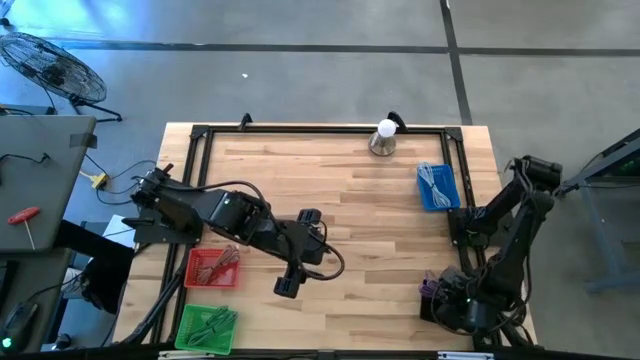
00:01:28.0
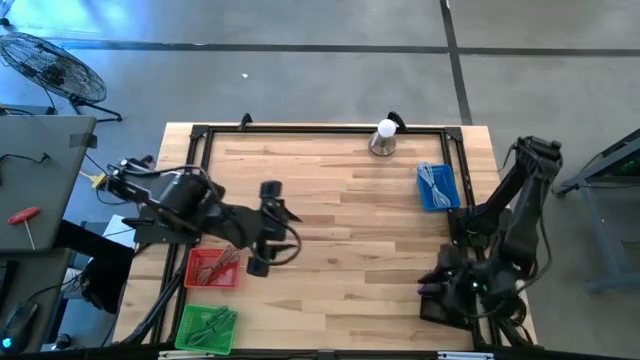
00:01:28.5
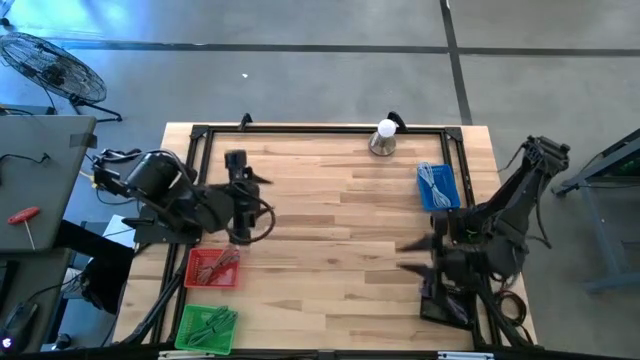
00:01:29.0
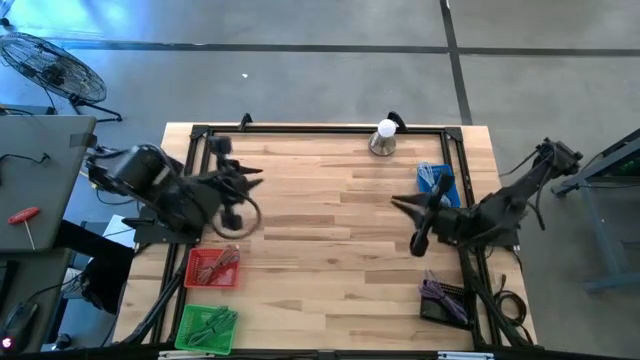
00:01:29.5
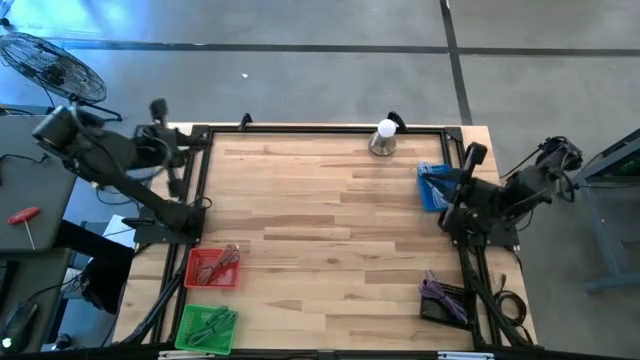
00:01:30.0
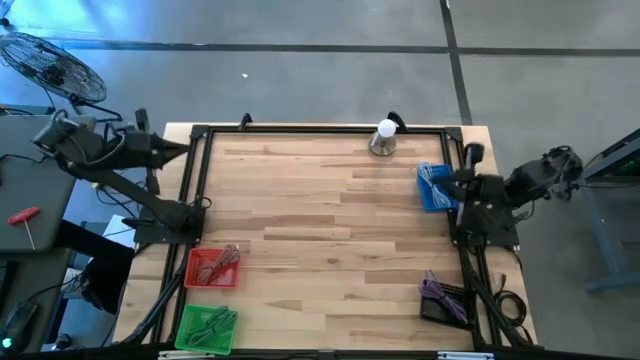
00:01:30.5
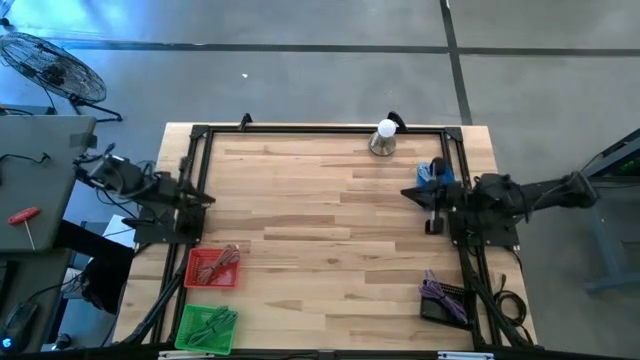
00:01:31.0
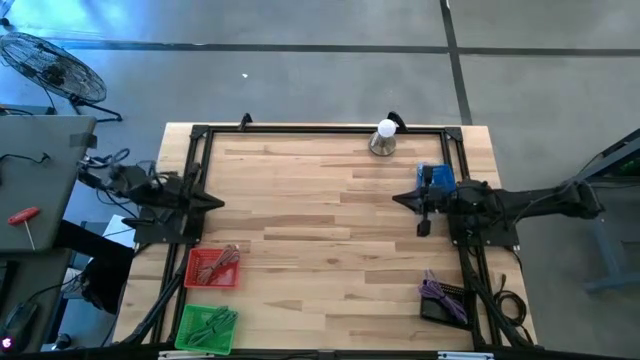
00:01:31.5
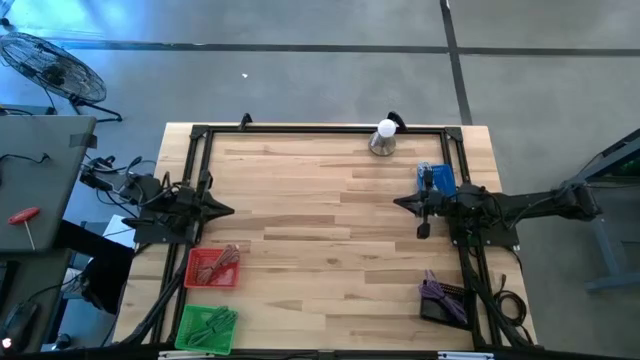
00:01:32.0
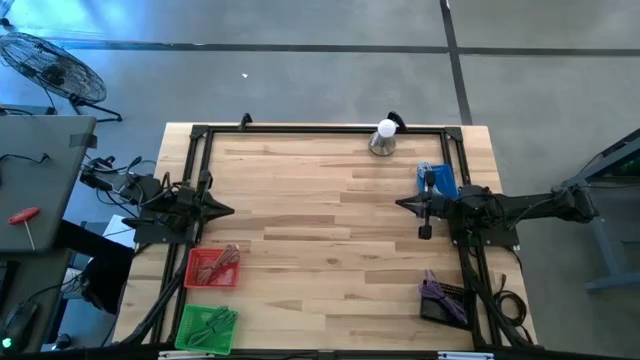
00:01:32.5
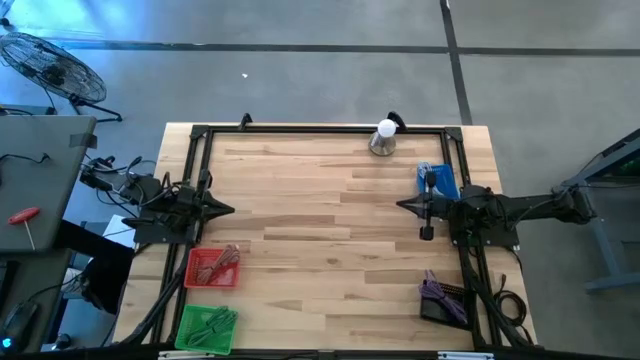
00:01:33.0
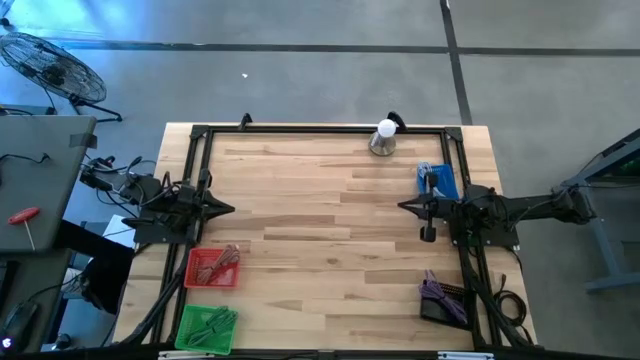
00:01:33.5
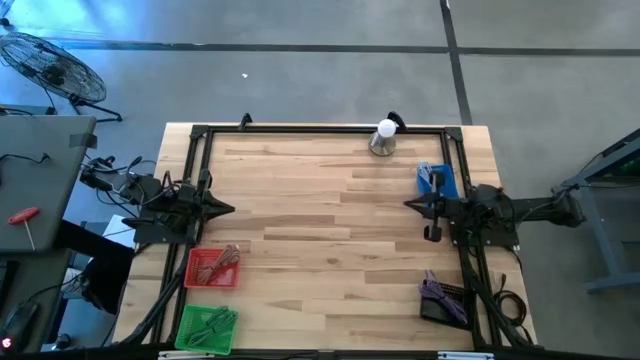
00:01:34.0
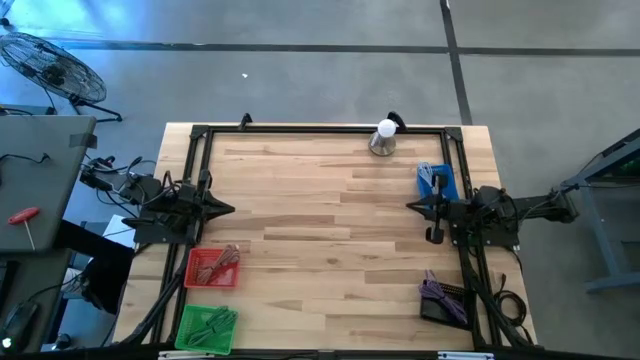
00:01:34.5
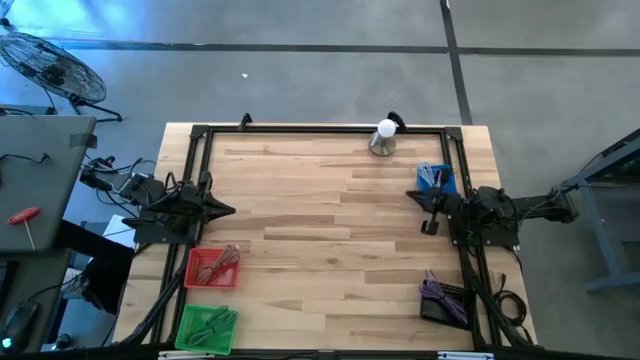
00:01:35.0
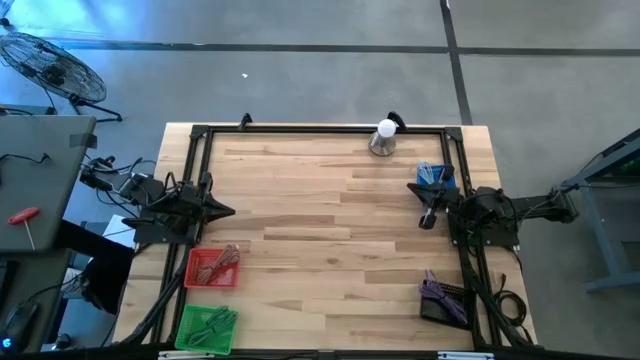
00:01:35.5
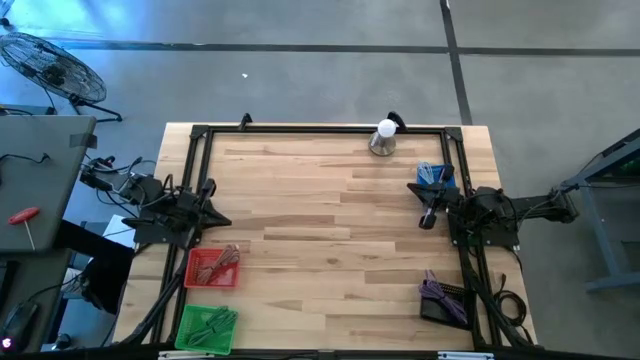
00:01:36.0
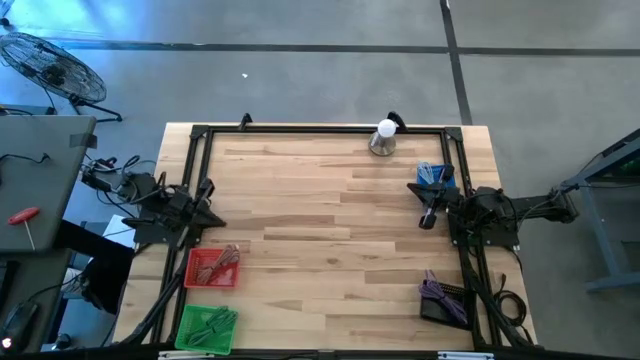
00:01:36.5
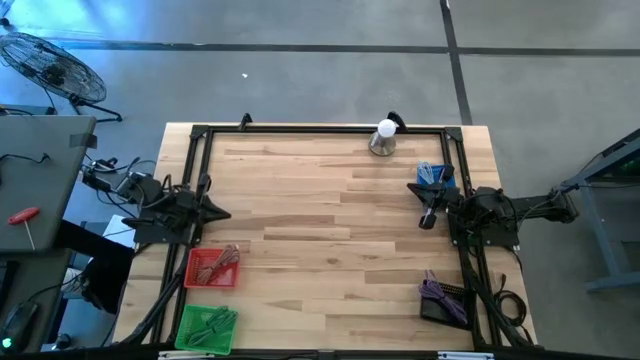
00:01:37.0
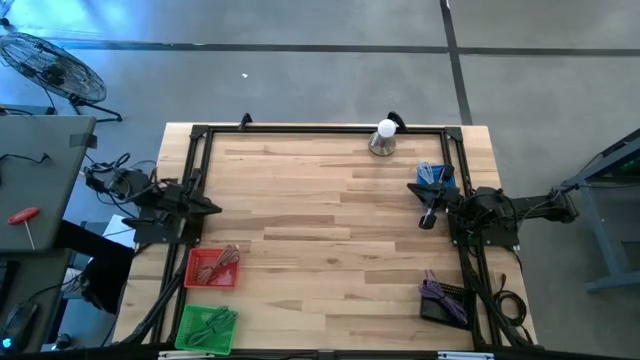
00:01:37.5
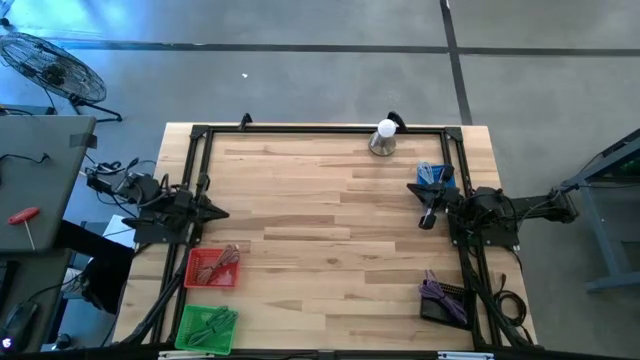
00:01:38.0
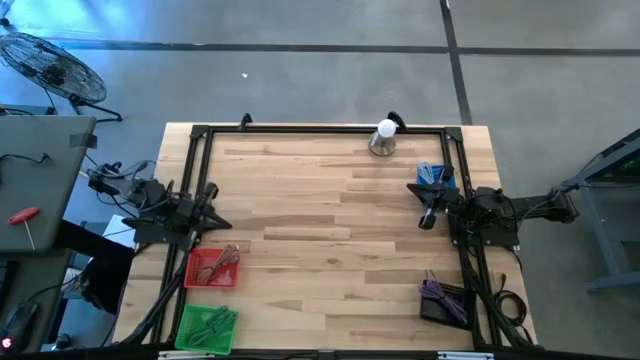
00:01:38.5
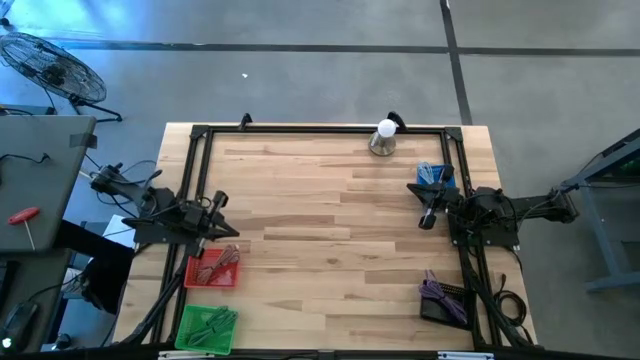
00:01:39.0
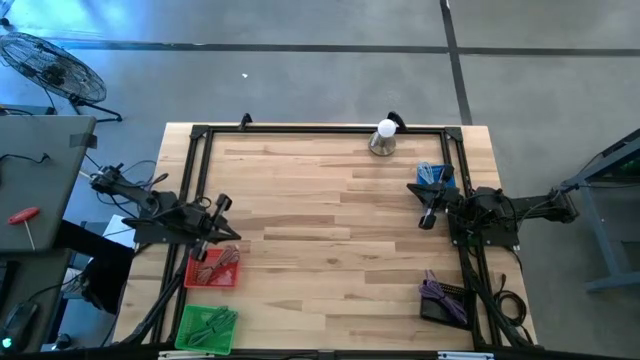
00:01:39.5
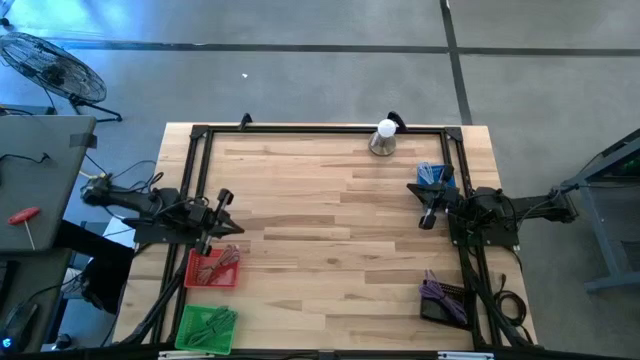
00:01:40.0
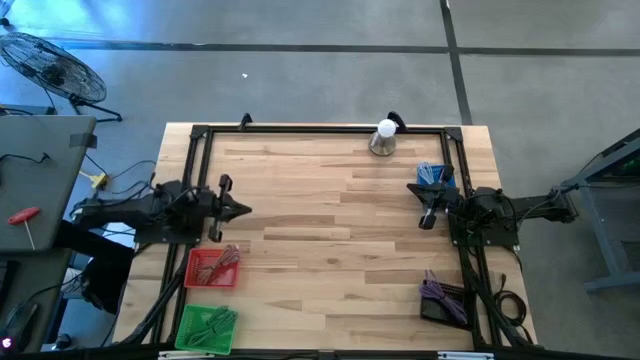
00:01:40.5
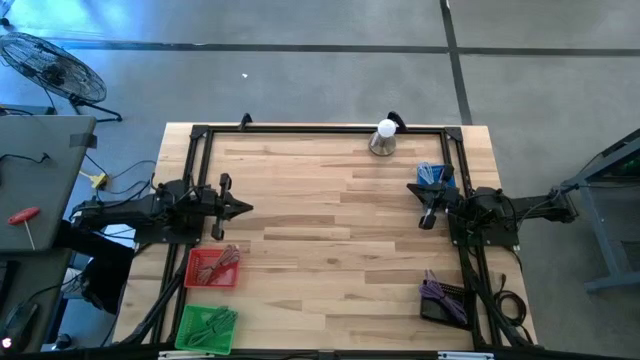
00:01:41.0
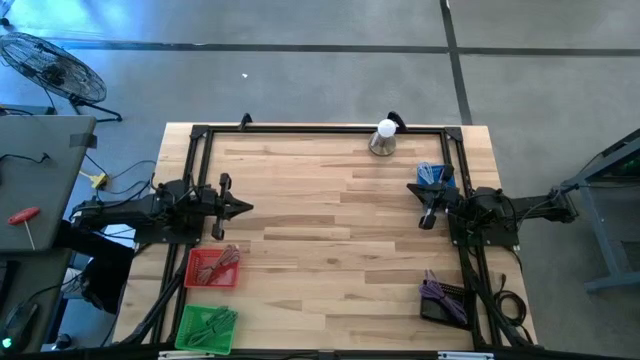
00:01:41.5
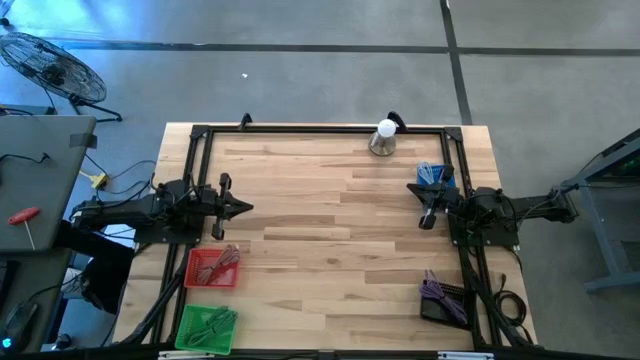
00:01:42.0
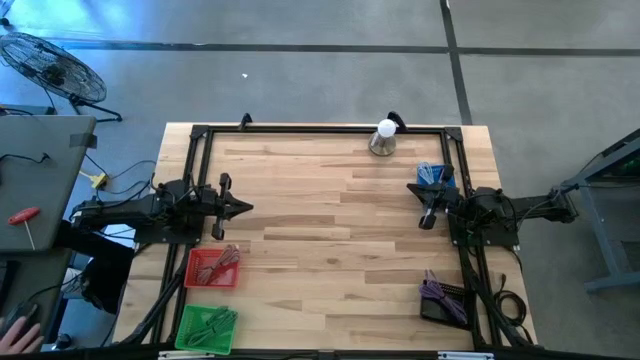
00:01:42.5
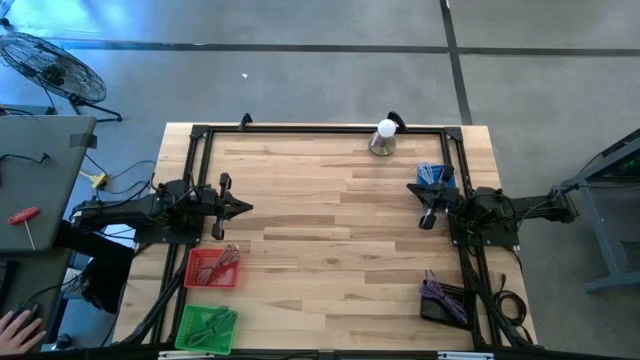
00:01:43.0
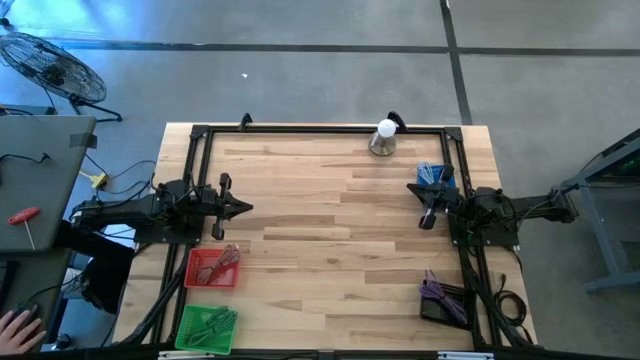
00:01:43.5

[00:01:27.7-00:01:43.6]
Task: Pick & Place USB Port
Return to Home Position

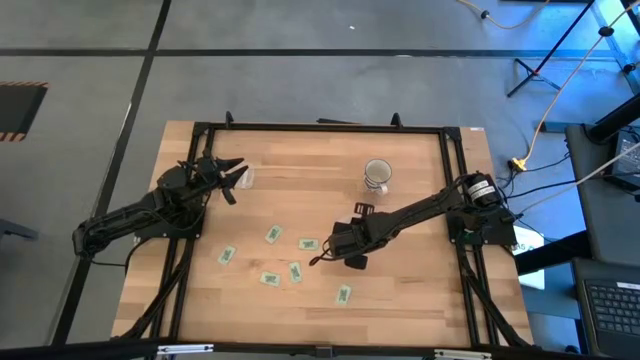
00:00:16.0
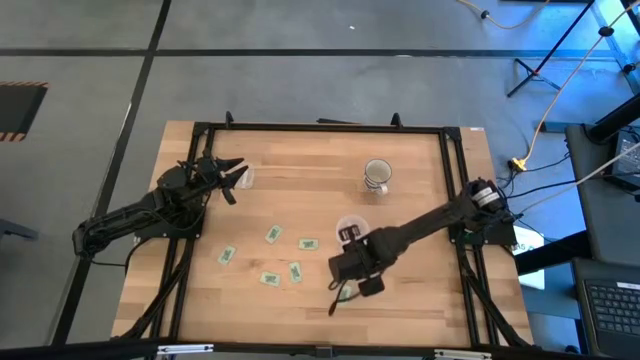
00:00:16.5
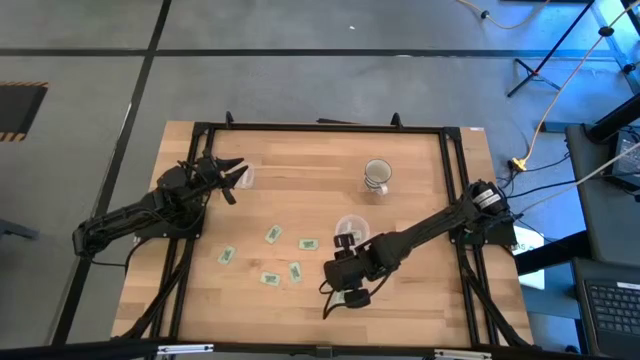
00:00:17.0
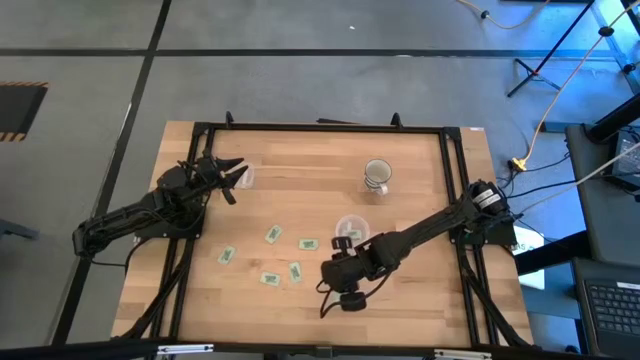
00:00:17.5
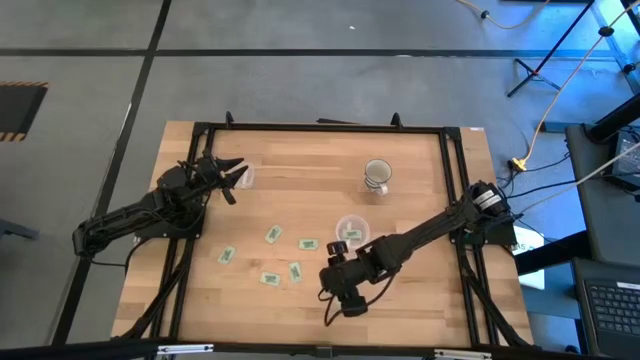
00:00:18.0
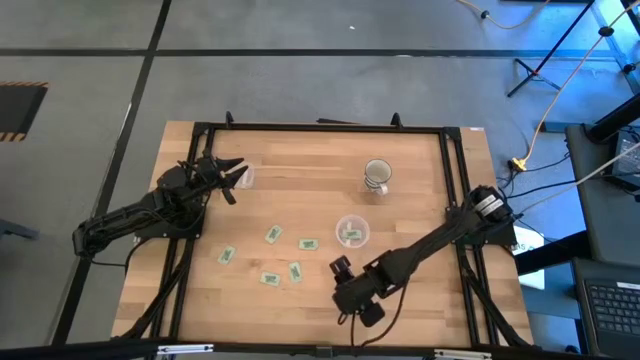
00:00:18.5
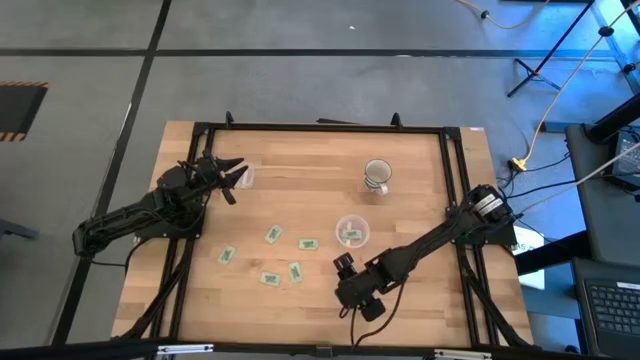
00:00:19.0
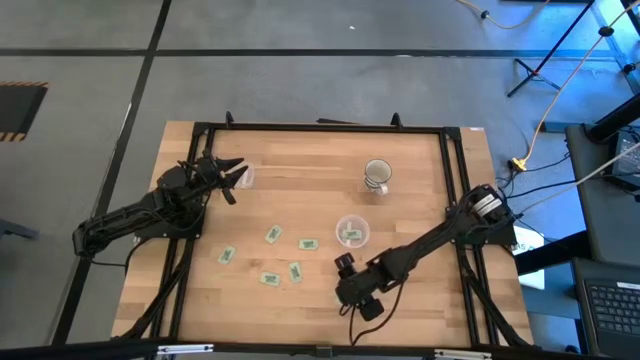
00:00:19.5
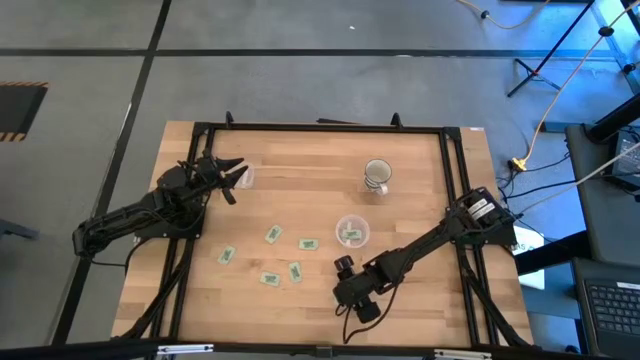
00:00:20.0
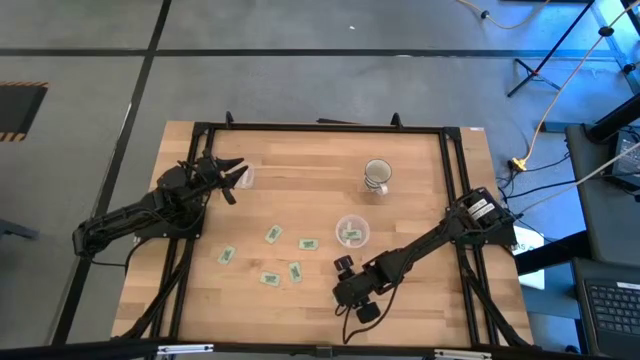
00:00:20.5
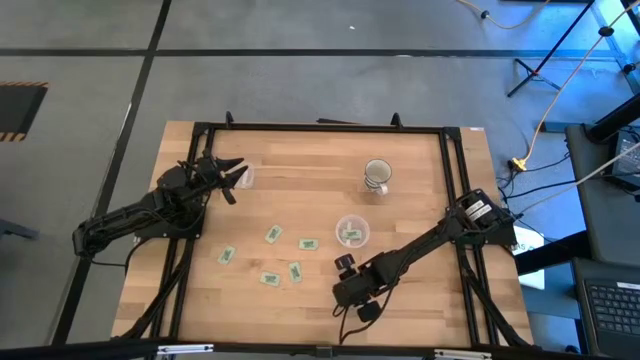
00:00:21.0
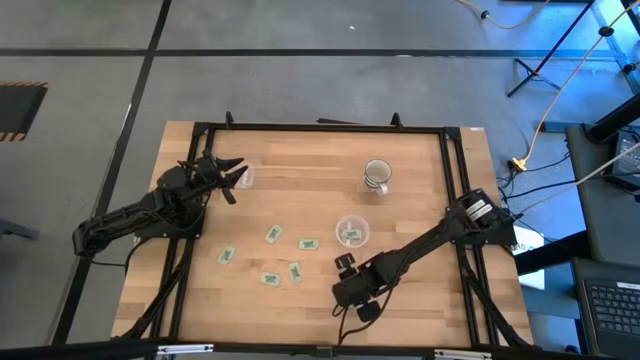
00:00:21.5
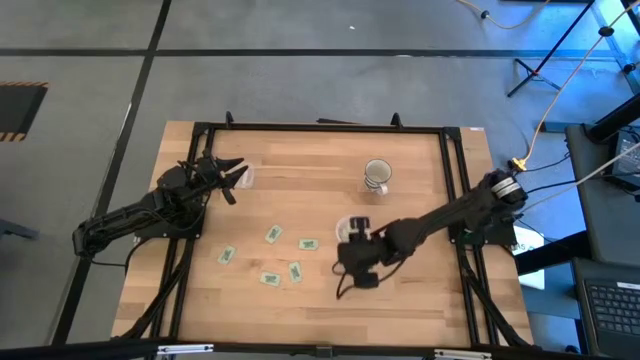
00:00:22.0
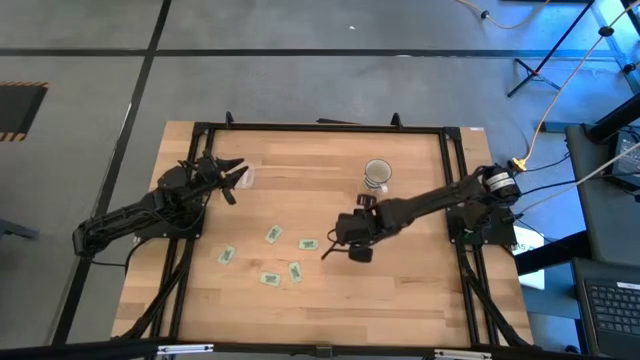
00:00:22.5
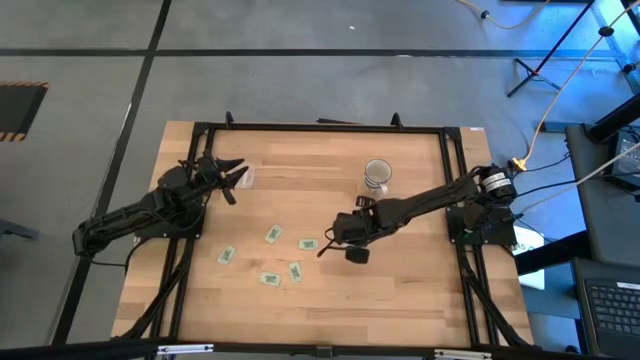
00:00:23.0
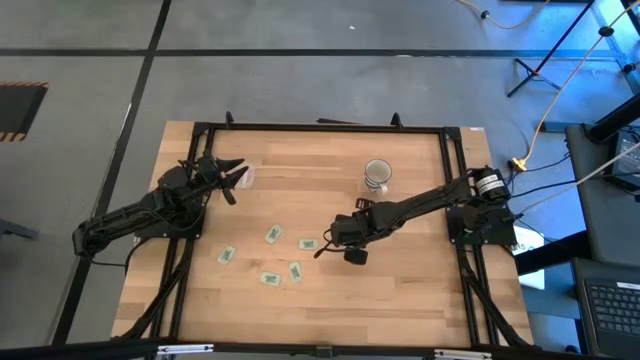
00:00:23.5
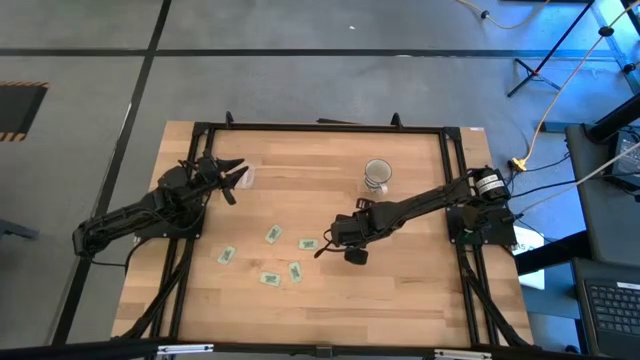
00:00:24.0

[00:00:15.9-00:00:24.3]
Task: Pick and place Stevia / Truvia into bins
Put the green stevia packet into the circular transparent container
